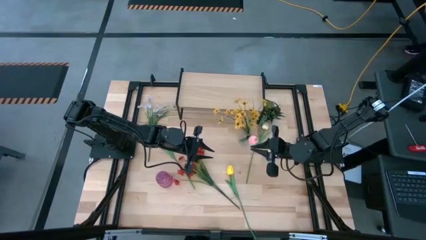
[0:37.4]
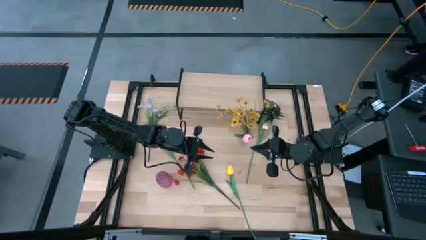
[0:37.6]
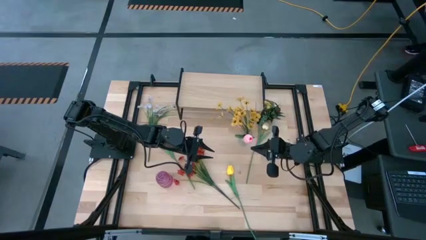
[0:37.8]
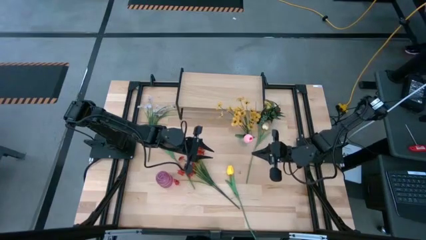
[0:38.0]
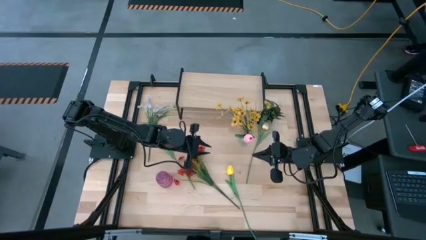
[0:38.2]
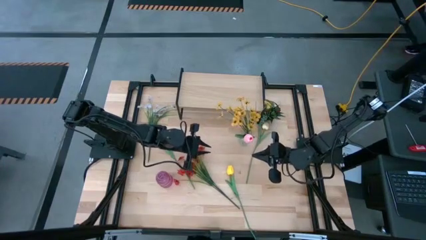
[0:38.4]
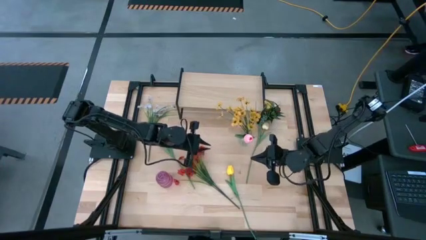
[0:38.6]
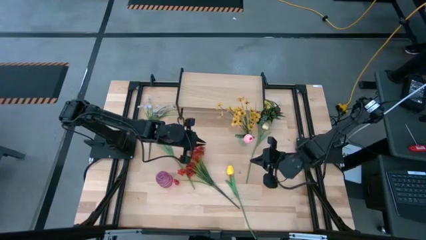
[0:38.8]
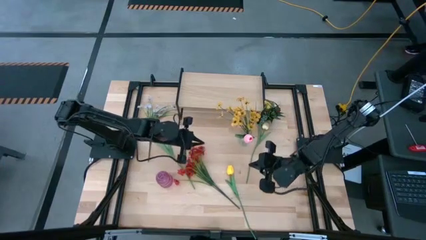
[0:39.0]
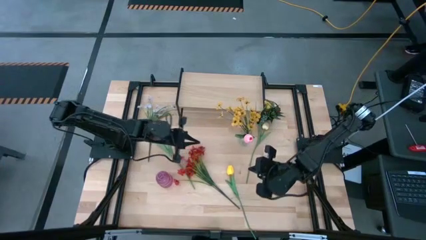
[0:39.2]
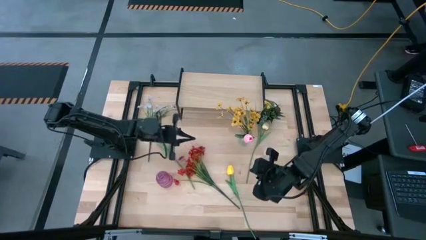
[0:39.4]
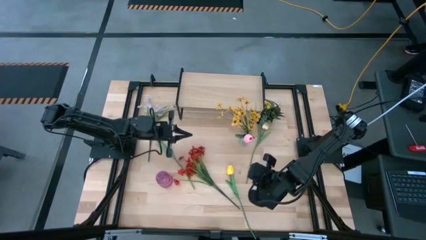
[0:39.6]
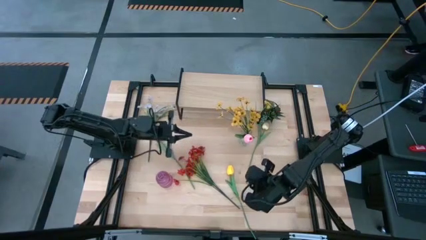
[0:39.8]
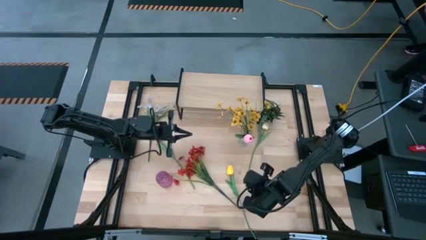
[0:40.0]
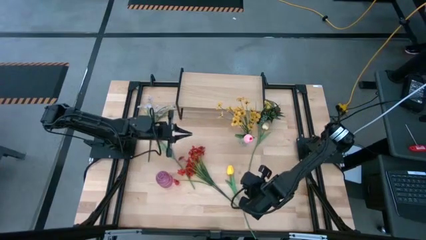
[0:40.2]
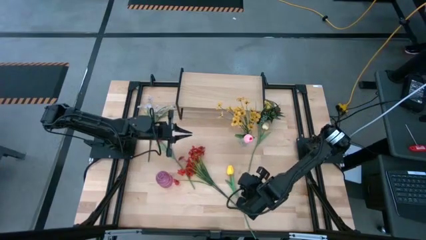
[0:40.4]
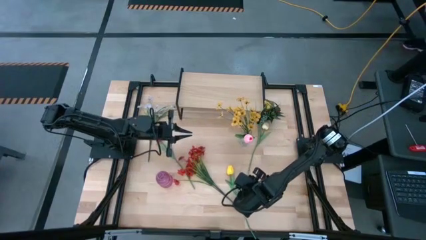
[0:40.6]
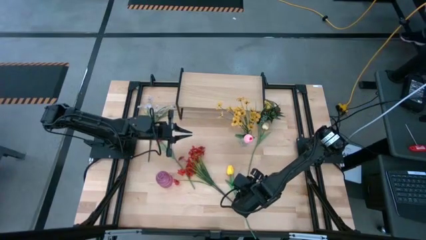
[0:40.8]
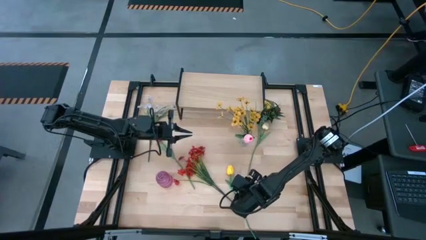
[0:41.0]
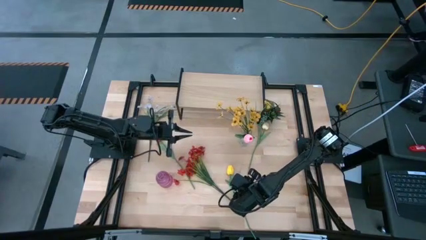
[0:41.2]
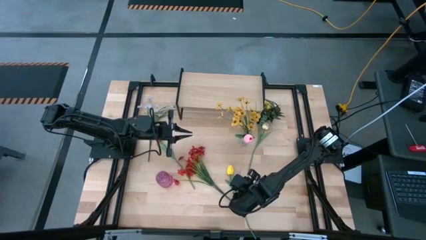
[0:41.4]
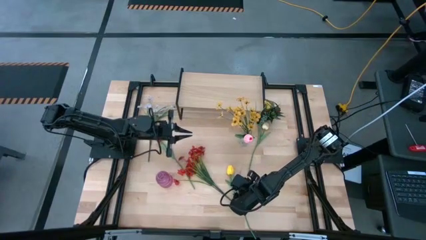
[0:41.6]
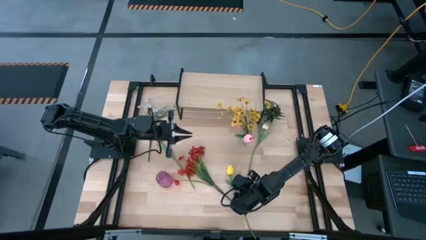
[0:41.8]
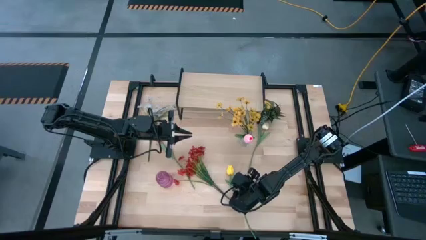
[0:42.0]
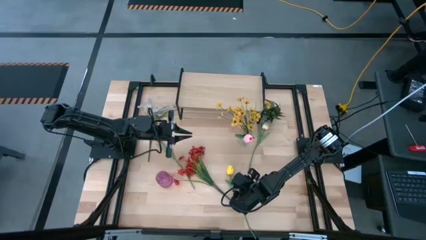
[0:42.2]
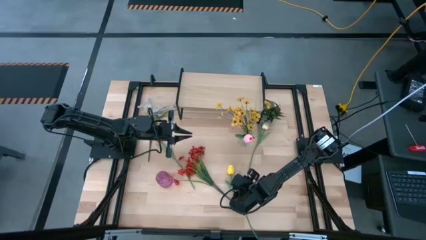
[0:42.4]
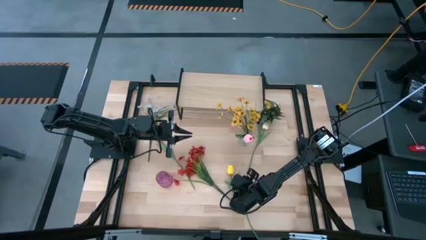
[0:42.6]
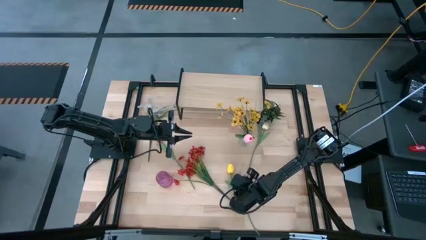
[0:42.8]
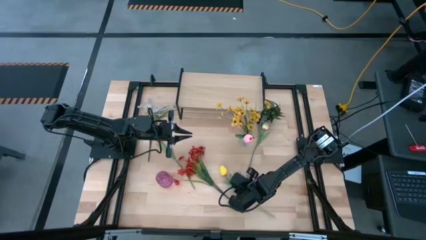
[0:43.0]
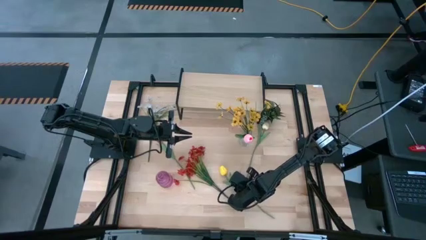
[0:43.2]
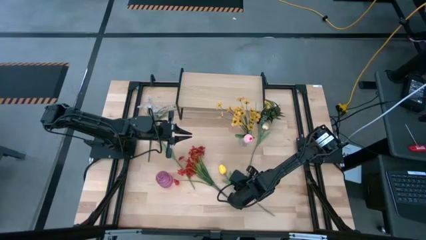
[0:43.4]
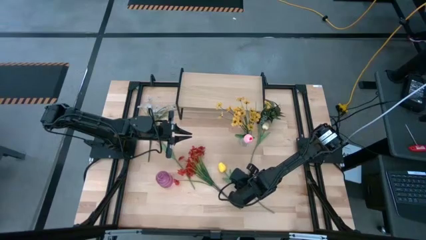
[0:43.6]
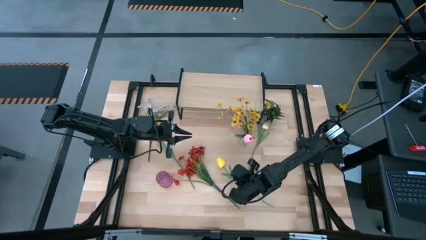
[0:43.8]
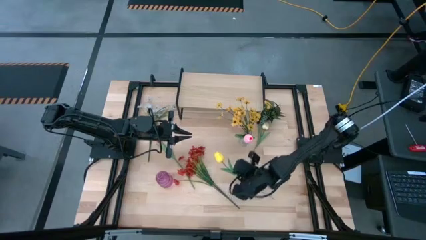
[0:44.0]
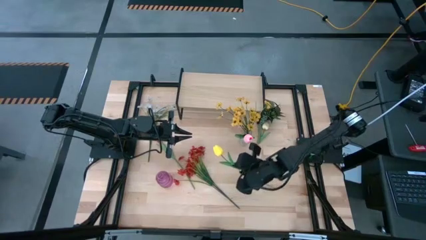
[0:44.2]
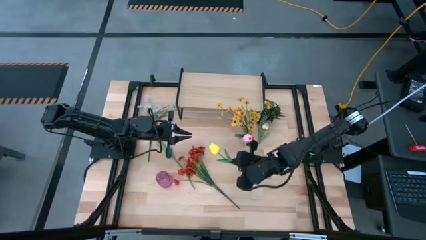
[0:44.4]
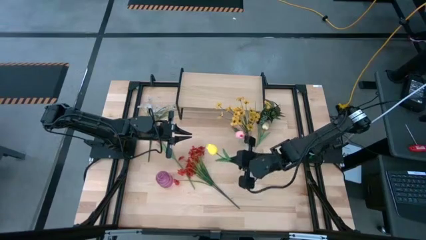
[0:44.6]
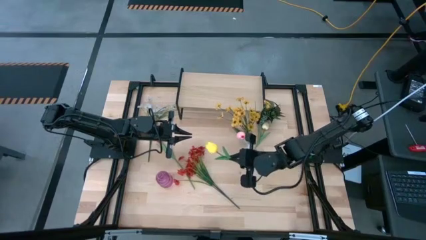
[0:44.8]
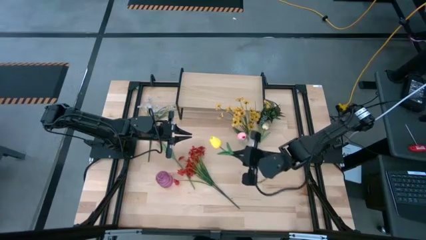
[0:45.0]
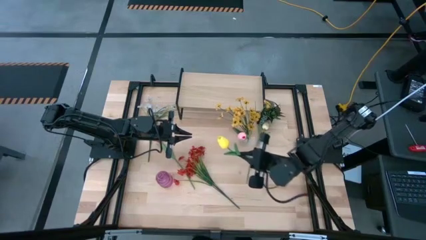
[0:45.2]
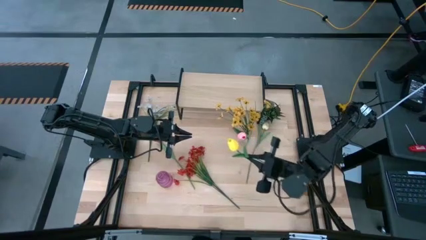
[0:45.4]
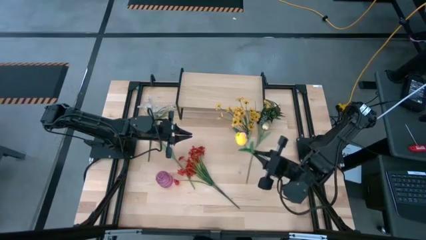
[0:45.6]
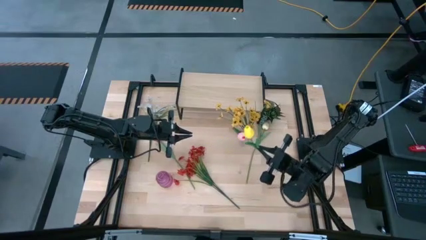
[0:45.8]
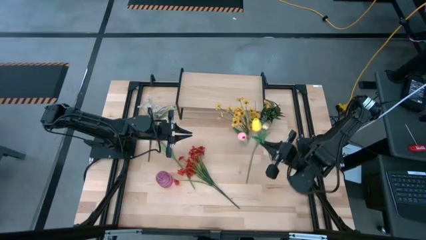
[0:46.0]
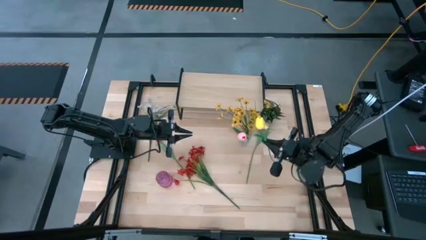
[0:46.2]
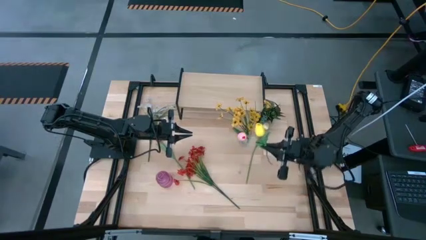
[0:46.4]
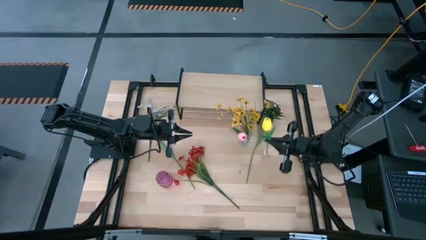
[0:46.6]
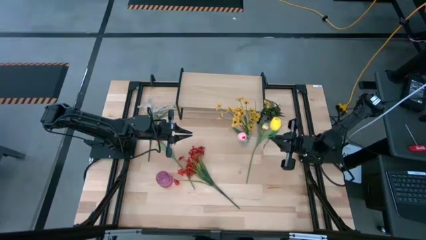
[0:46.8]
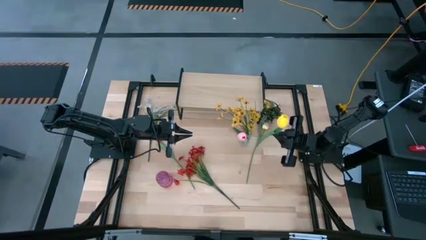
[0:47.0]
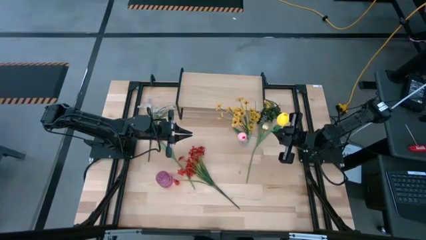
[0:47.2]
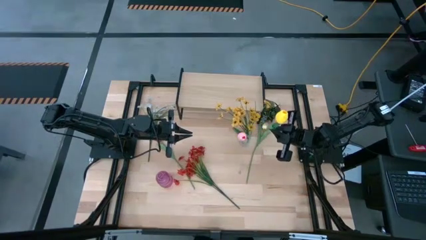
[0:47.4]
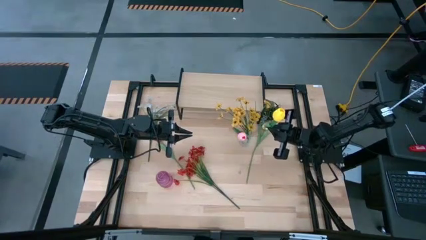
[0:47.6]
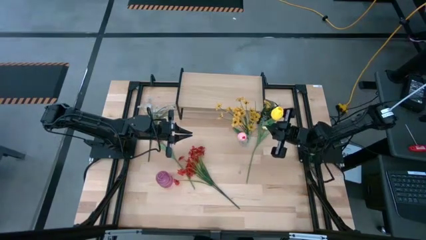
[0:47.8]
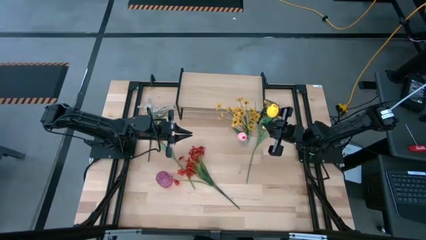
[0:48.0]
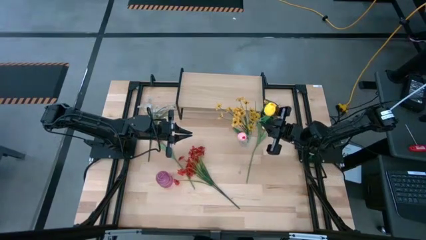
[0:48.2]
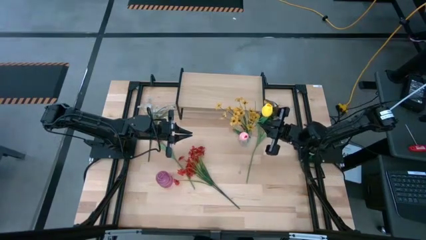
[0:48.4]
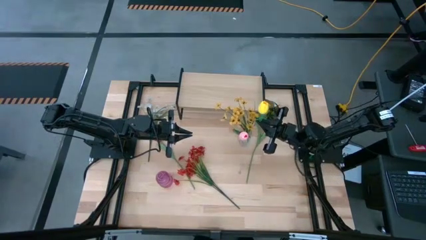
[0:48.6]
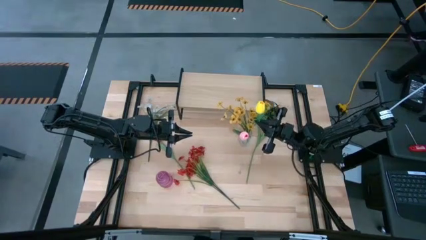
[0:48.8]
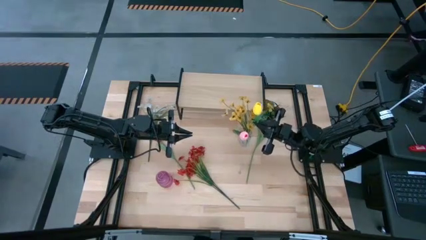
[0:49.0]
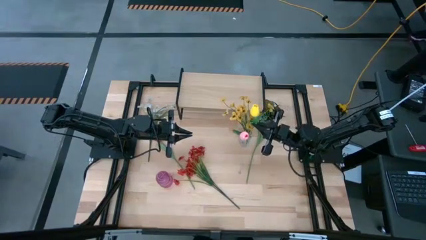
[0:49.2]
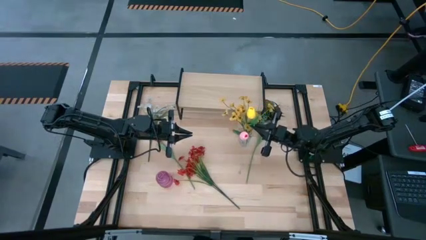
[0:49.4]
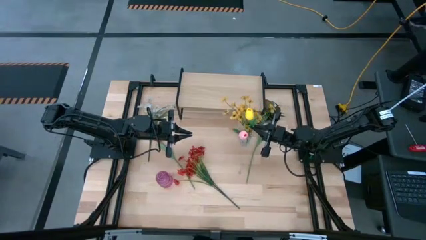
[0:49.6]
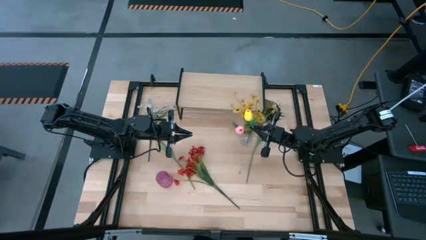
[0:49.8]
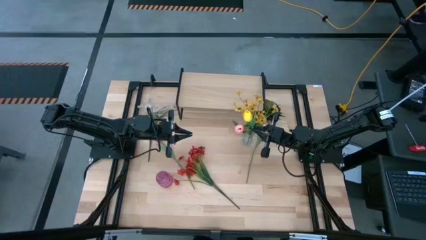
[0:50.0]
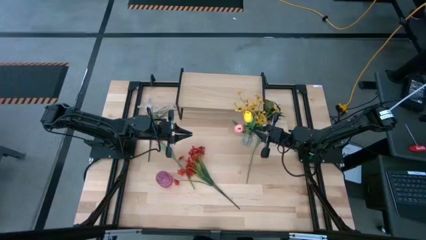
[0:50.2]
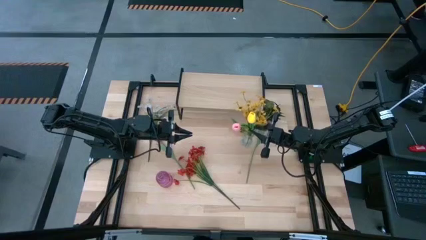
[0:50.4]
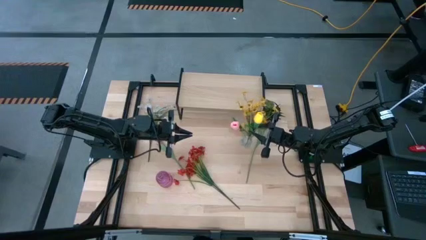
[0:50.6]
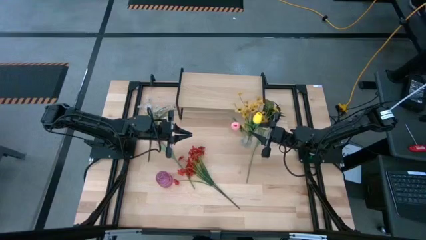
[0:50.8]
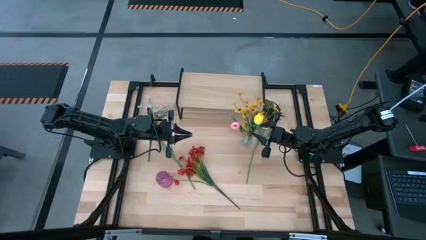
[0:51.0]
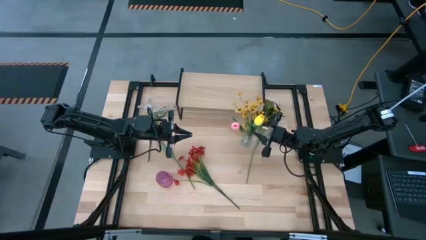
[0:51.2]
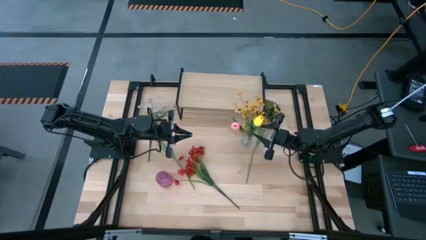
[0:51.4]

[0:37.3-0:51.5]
Task: Pick and place flowers into a vace then onto a shelf
Put the yellow flower into the transparent vase

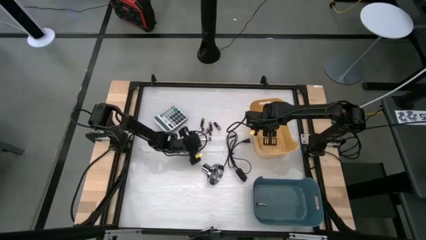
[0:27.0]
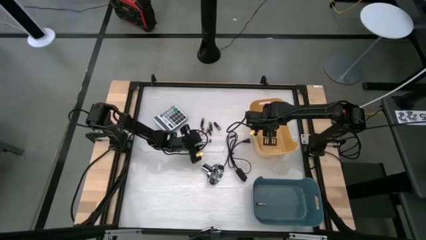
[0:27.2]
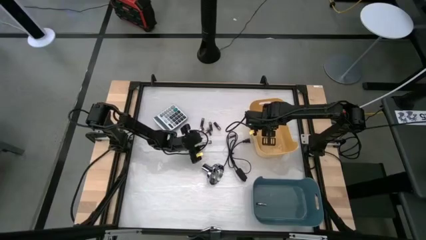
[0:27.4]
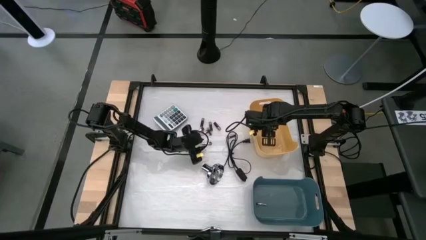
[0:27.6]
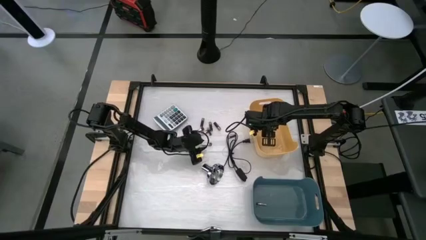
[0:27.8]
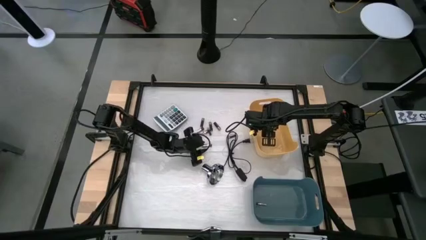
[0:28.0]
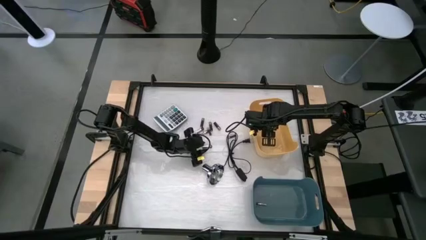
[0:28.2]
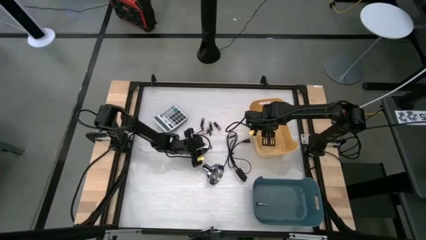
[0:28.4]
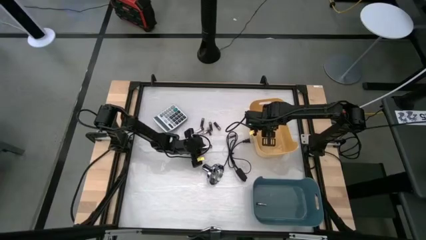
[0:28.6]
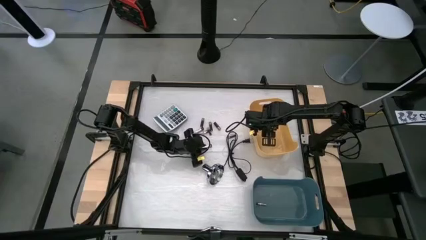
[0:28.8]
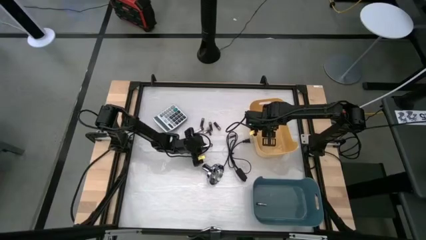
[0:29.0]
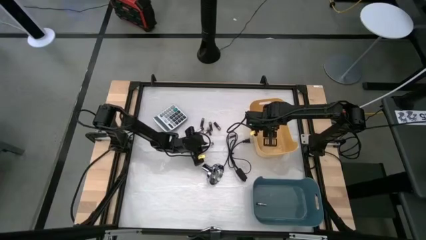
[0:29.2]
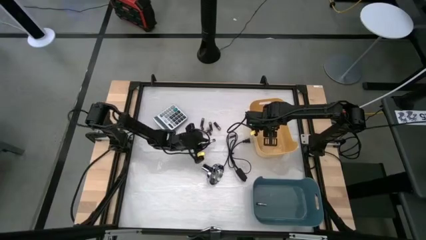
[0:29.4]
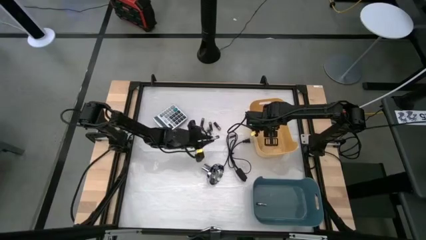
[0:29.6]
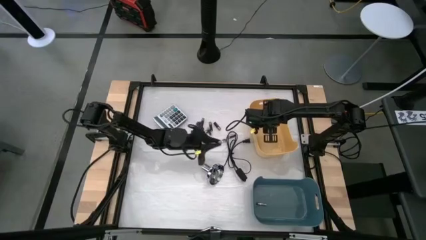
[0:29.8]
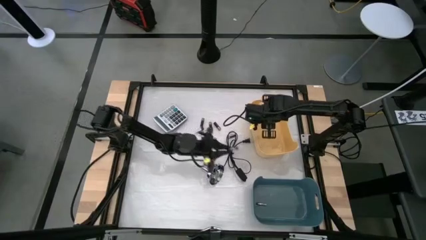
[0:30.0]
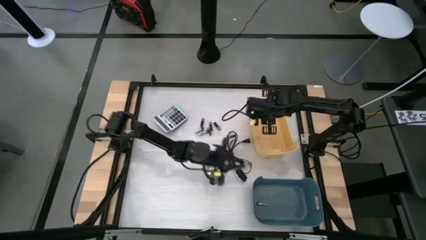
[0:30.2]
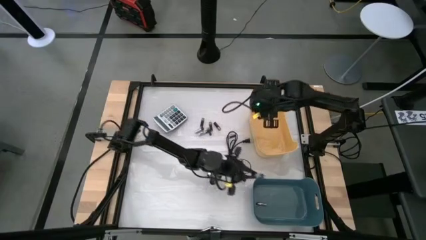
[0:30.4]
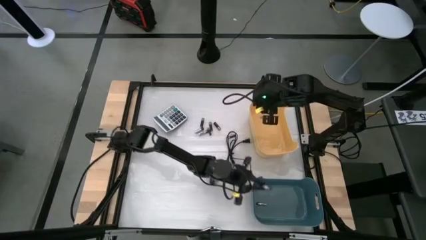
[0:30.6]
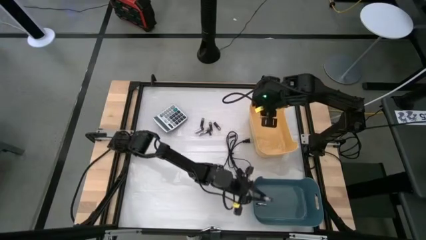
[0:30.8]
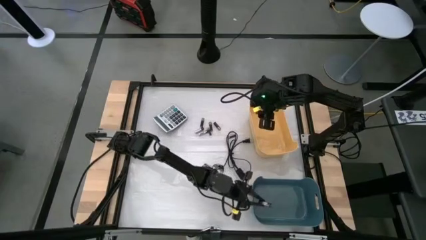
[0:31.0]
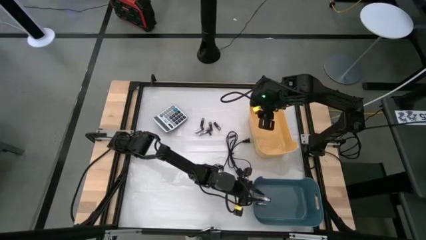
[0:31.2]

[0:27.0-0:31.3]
Task: Sort batteries
Put the white battery into the blue bin
